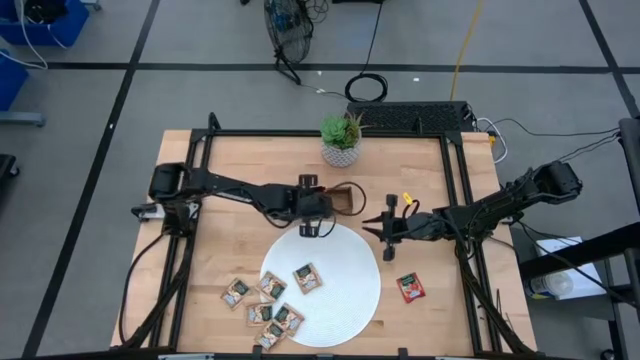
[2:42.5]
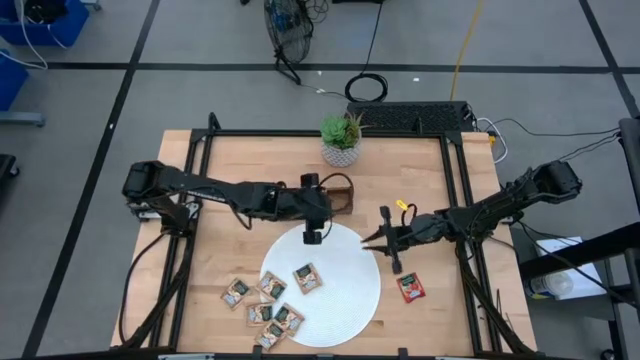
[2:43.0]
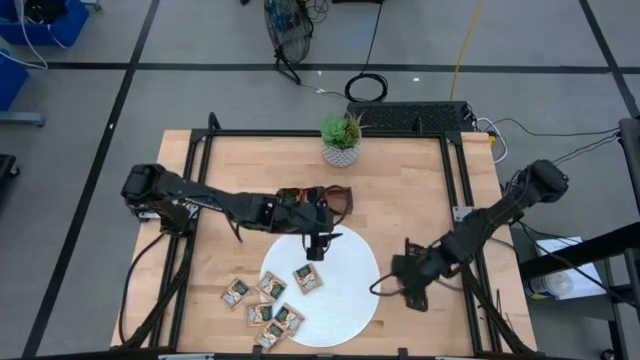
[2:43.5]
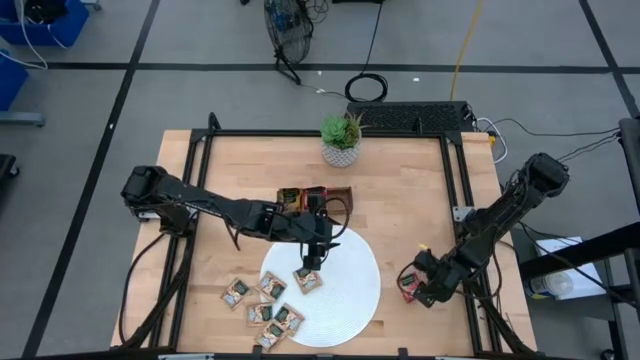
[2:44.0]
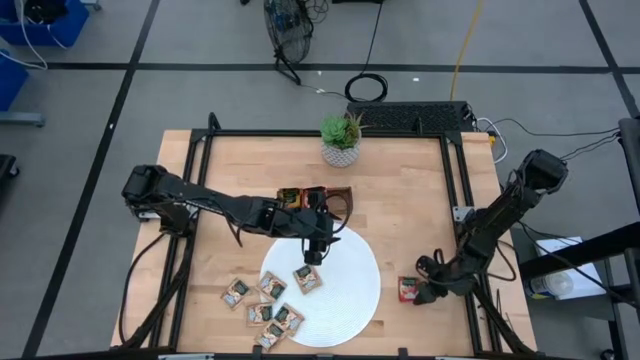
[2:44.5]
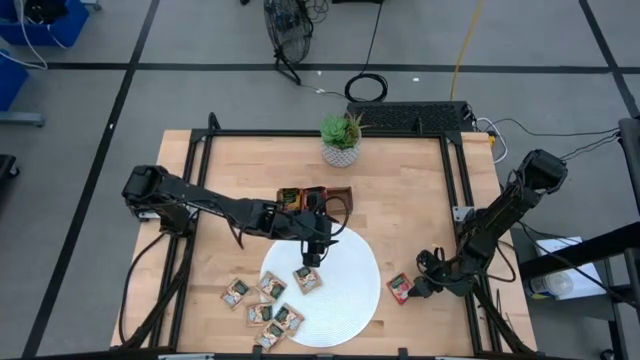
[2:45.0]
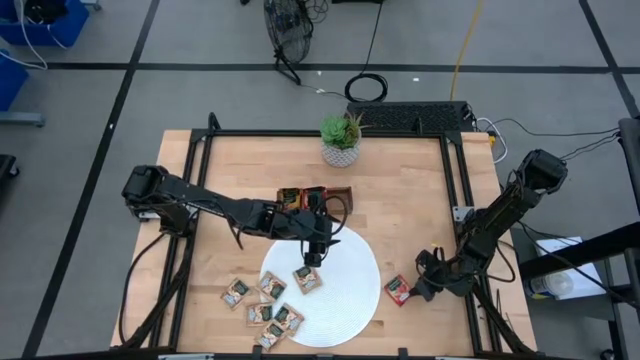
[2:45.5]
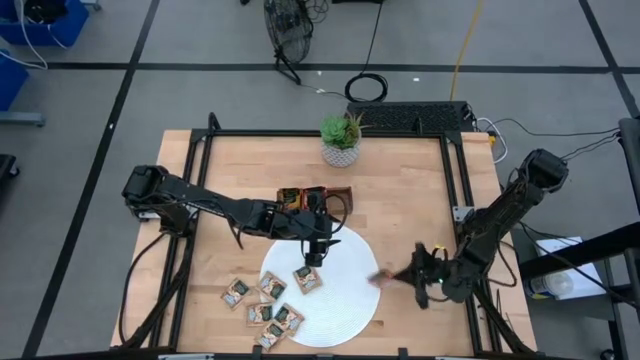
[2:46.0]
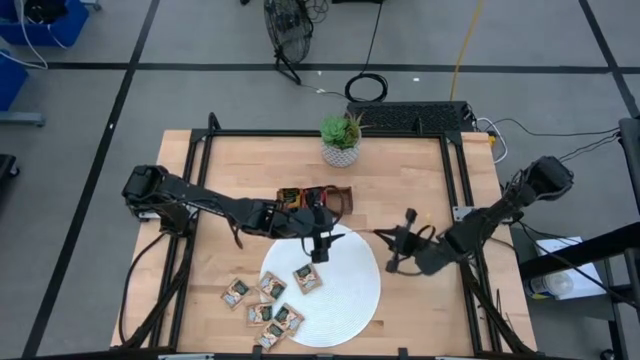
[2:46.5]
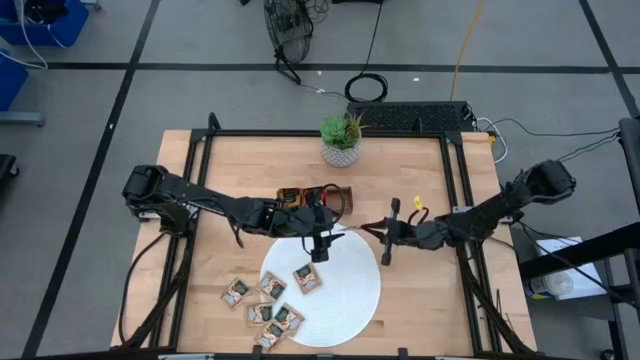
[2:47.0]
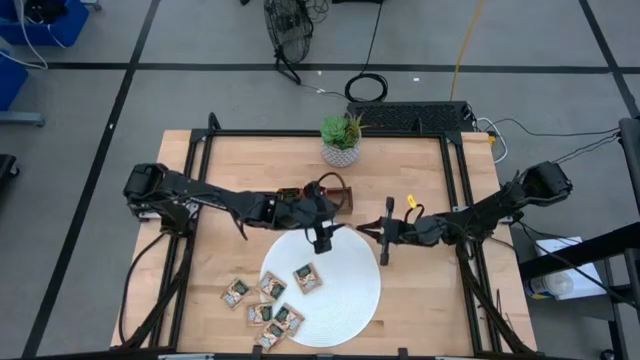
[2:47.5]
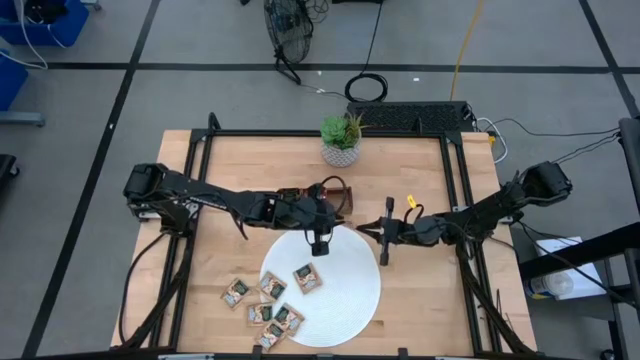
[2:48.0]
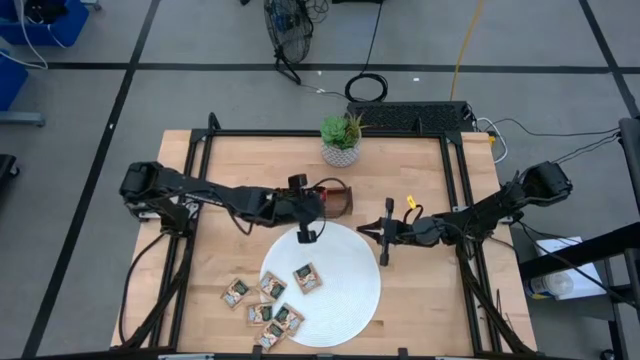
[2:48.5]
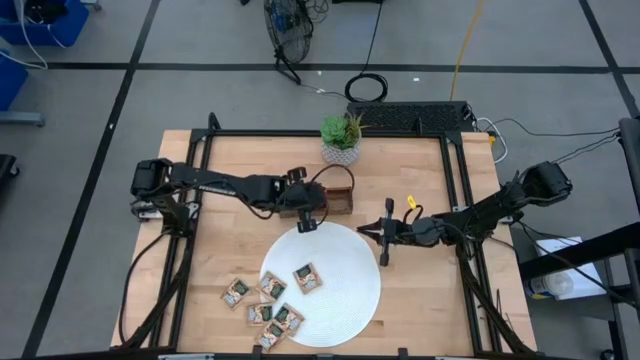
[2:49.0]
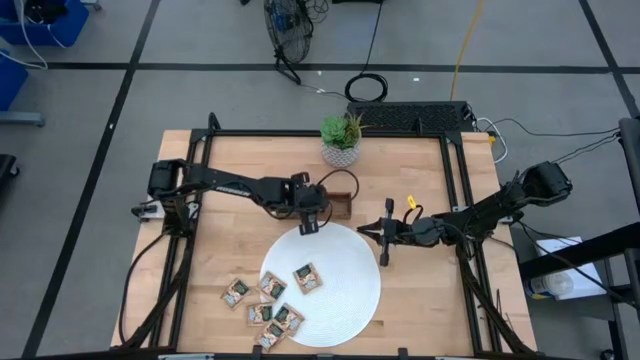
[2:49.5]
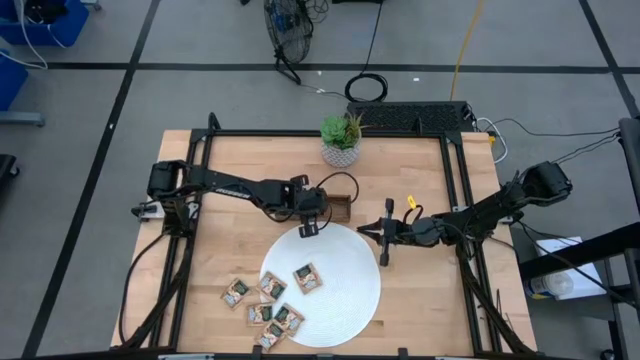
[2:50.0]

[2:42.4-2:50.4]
Task: Pick & Place Tea
Put the strawberry tea bag into the wooden organizer

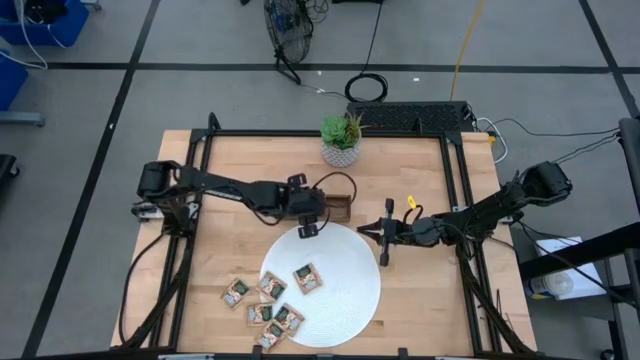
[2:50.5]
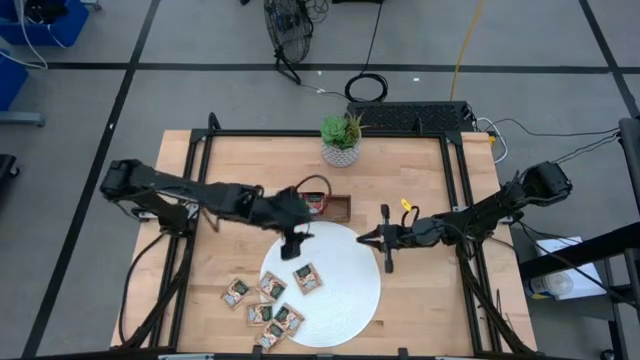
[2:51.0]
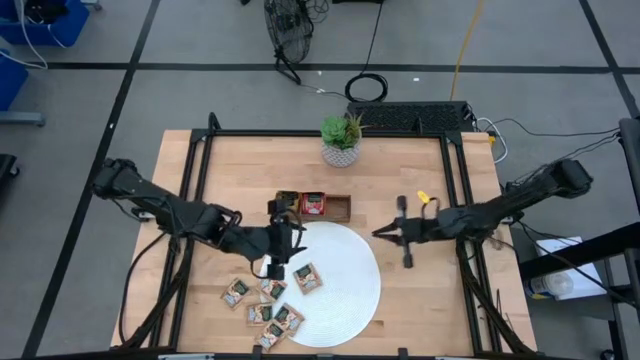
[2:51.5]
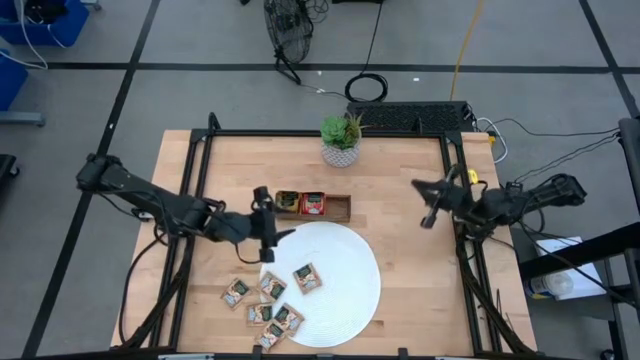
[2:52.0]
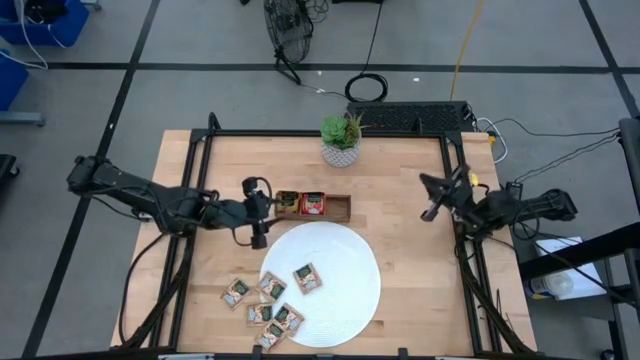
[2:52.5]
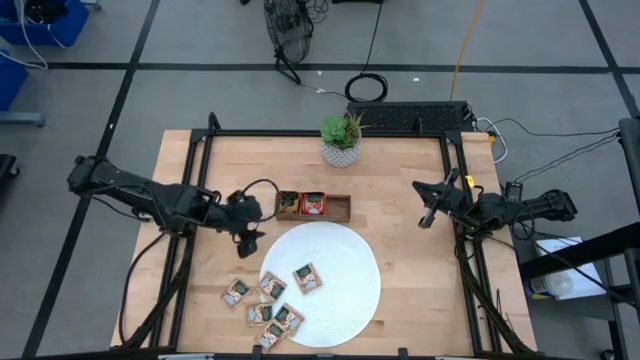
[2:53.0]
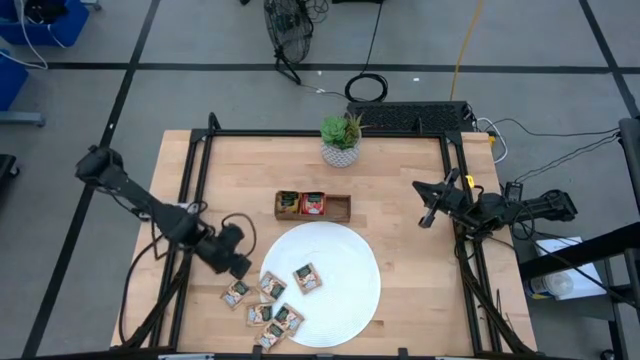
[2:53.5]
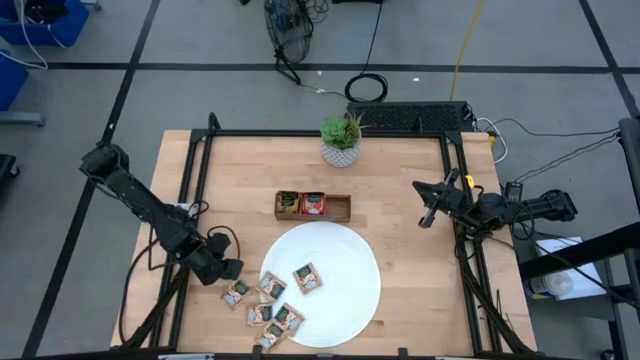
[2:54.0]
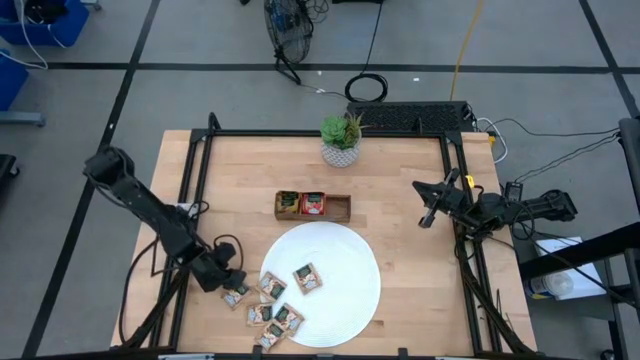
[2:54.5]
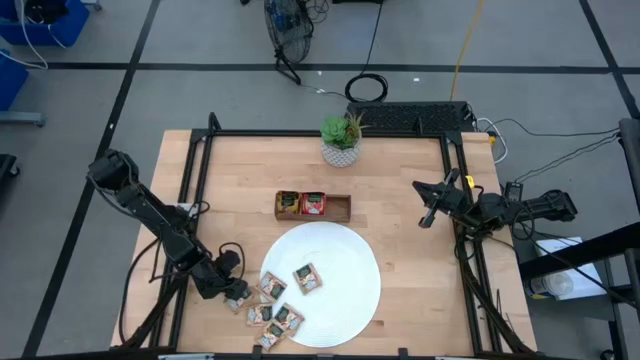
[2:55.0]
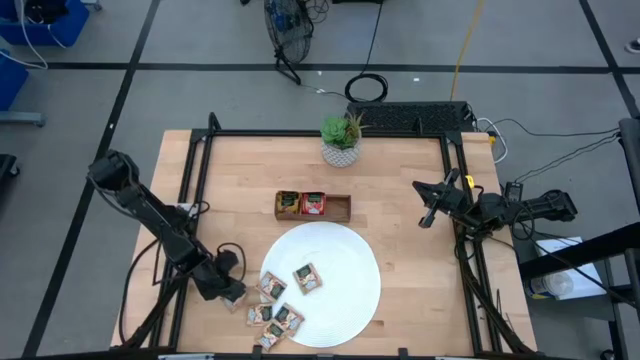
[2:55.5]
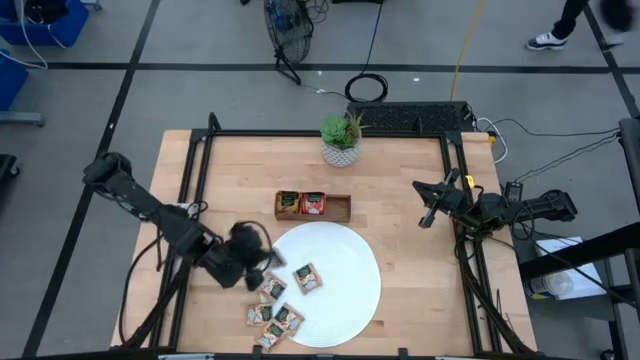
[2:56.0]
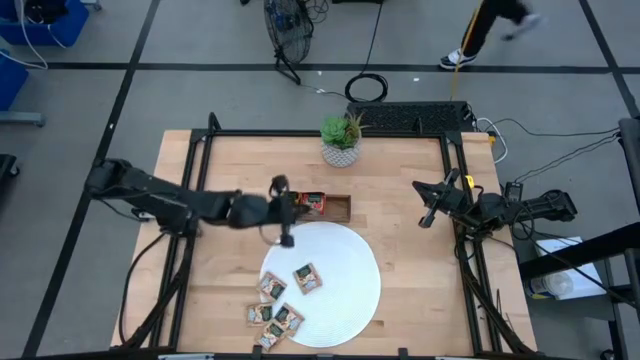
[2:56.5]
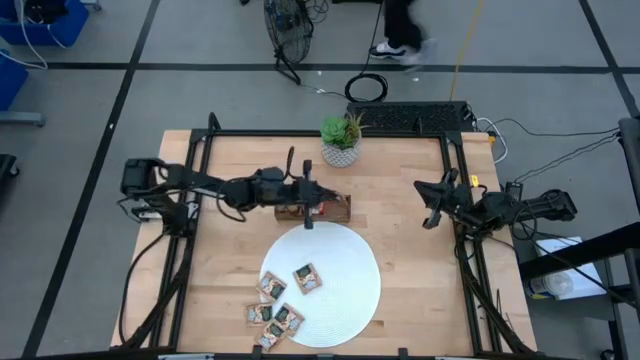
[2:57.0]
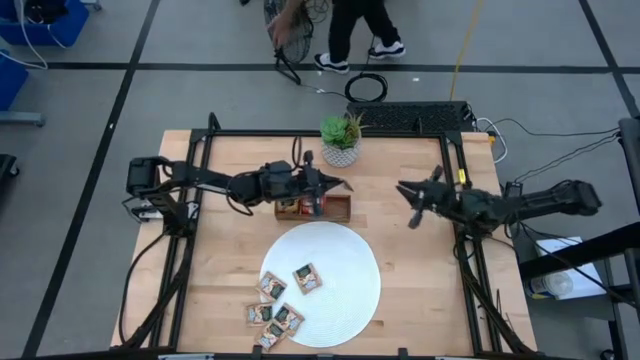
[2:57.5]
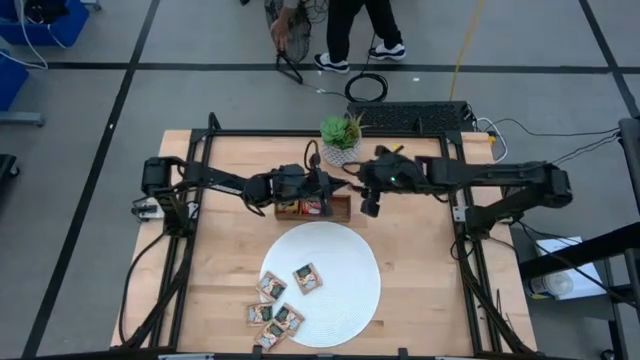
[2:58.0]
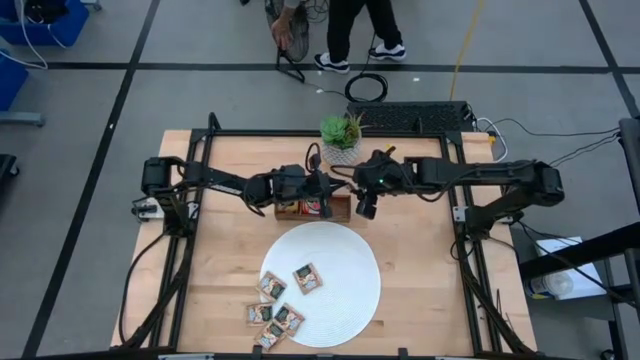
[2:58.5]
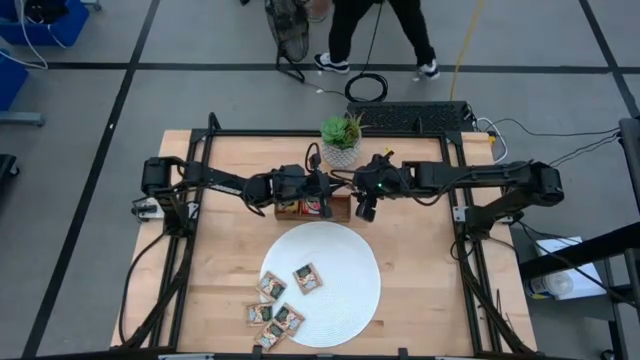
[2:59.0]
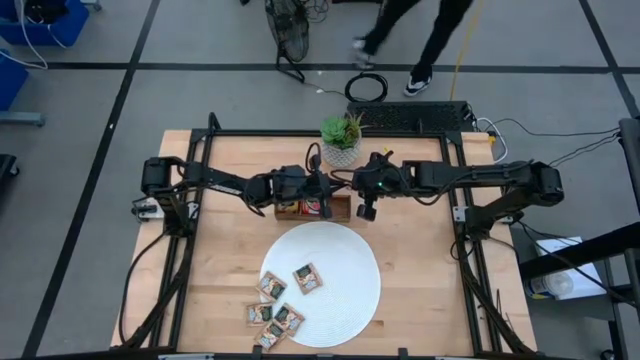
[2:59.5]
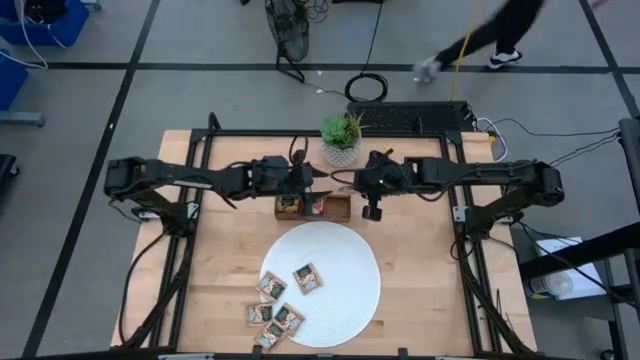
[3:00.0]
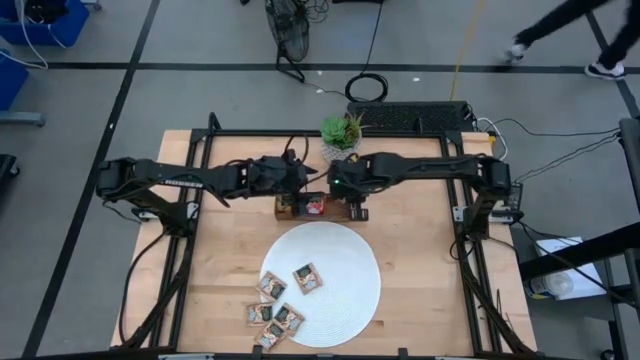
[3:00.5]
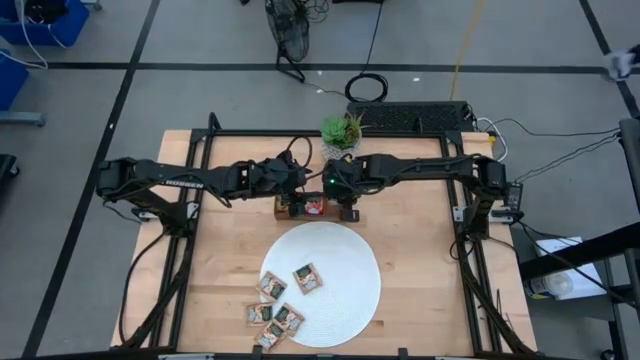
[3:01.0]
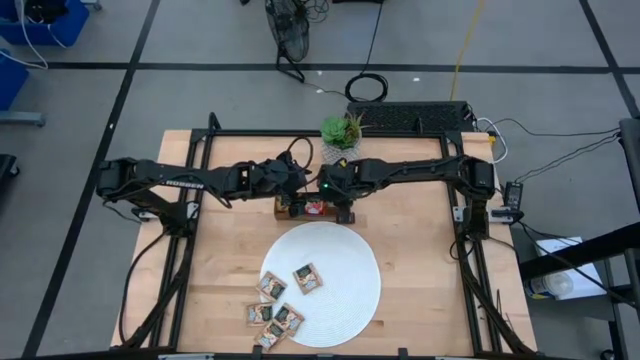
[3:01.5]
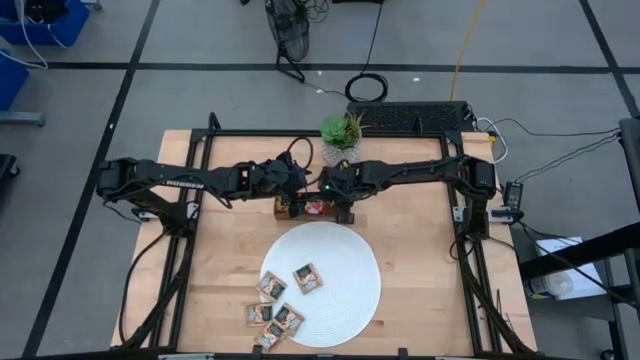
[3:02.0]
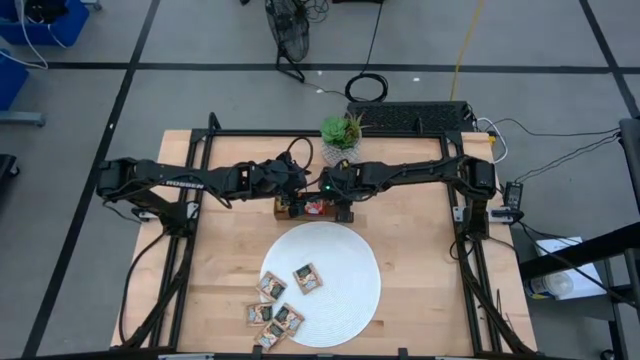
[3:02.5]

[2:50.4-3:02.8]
Put the vanilla tea bag into the wooden organizer
